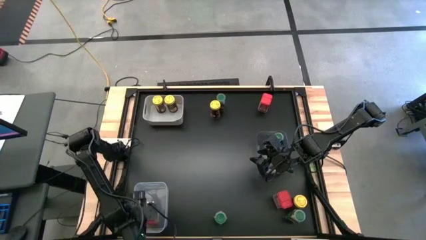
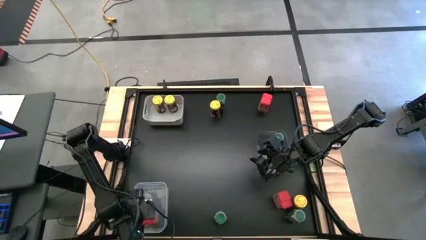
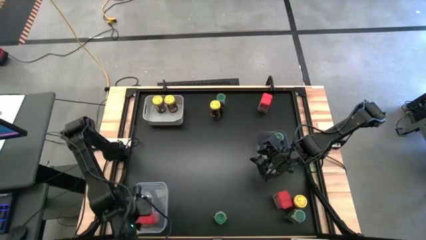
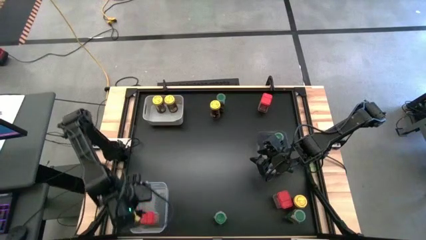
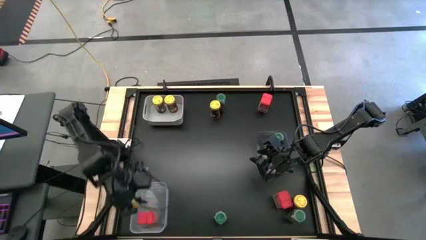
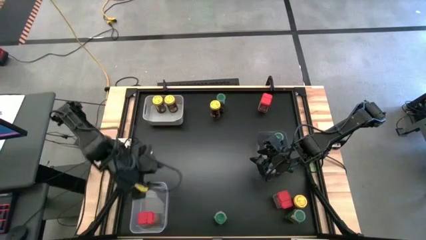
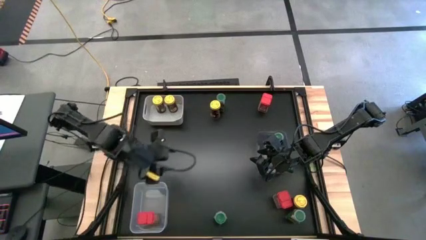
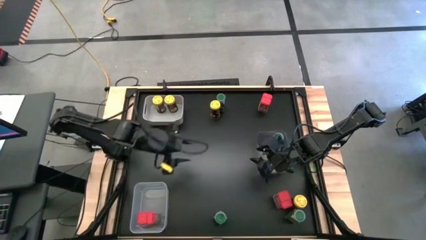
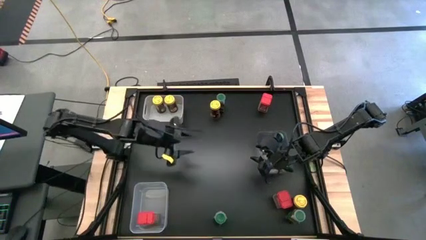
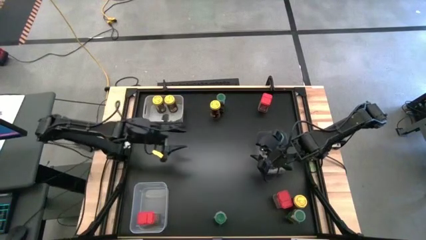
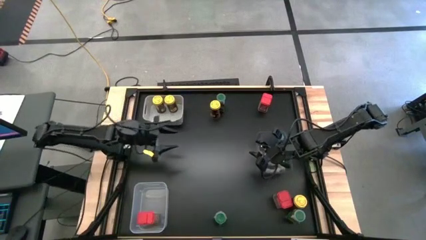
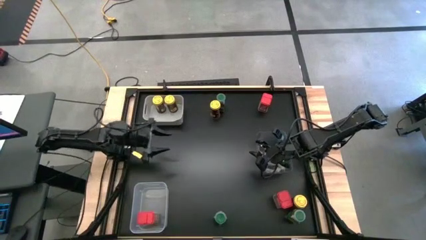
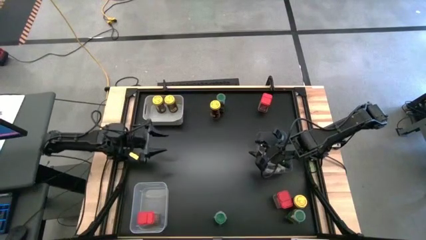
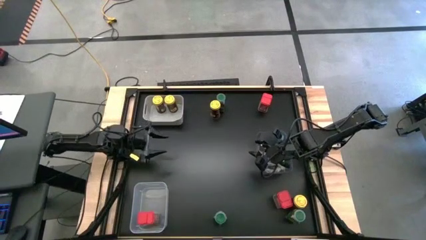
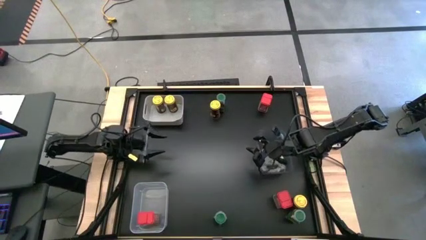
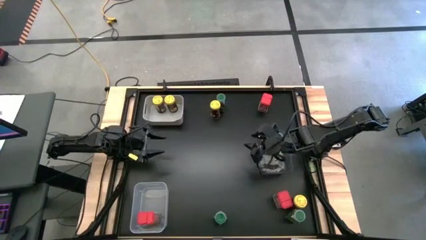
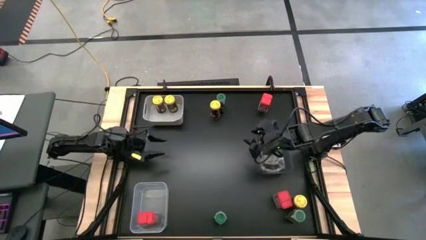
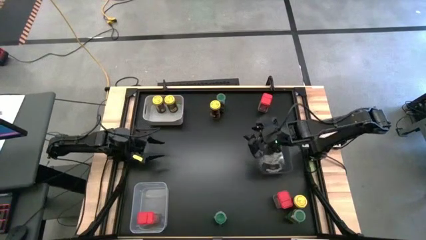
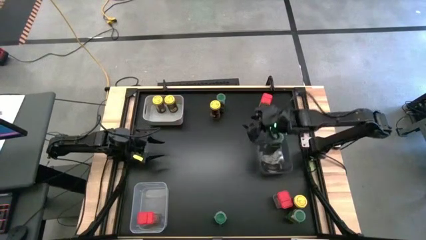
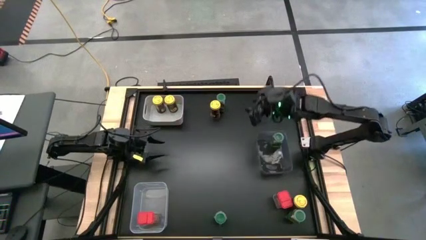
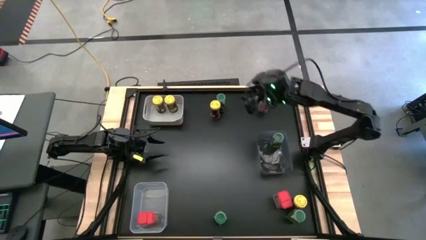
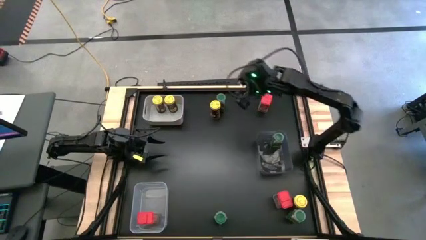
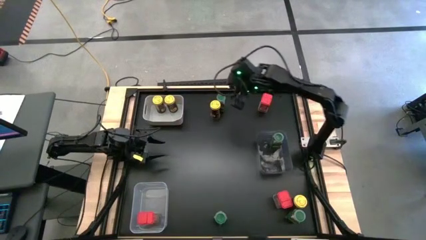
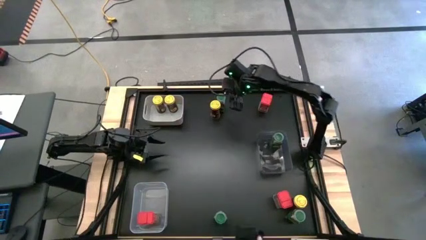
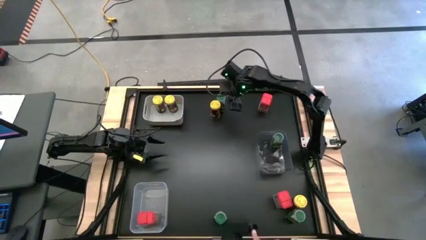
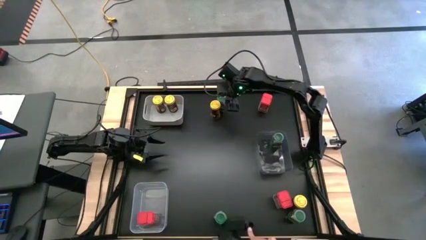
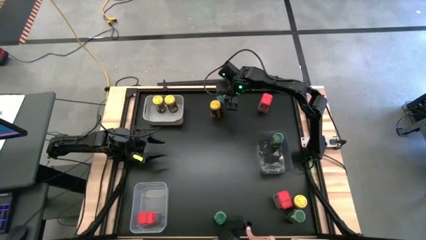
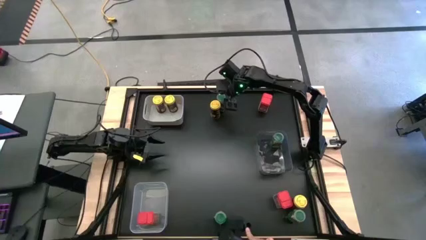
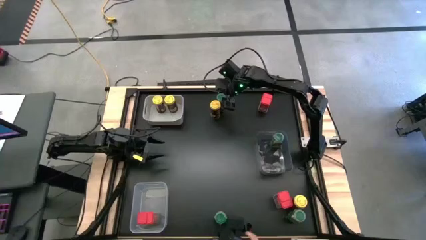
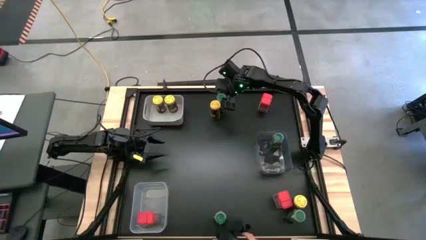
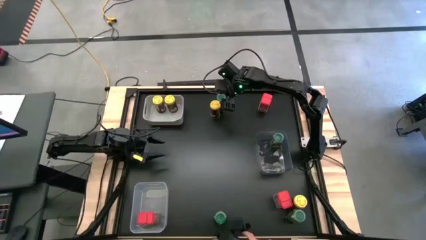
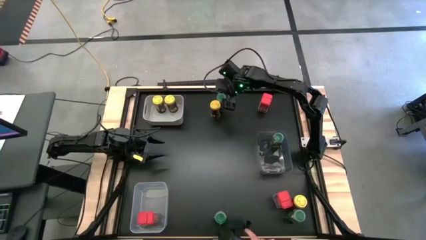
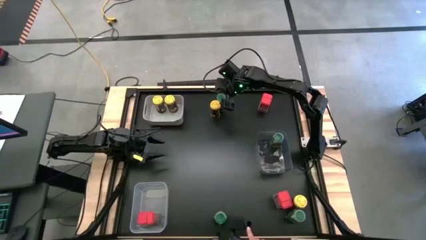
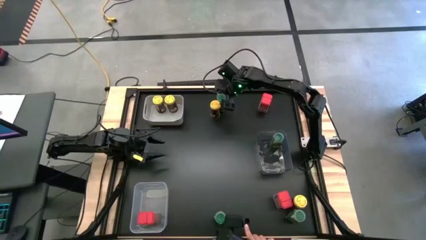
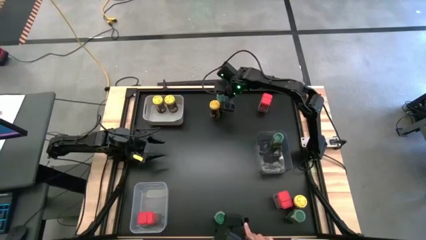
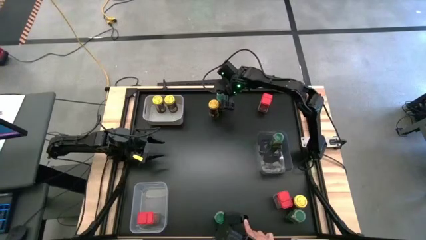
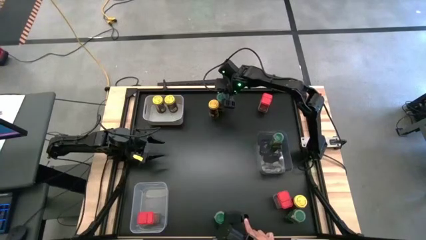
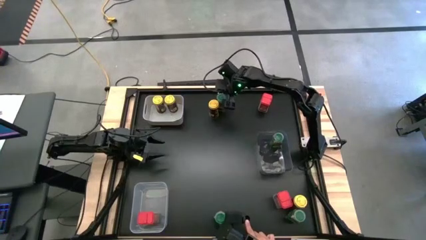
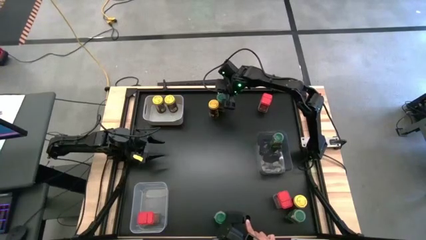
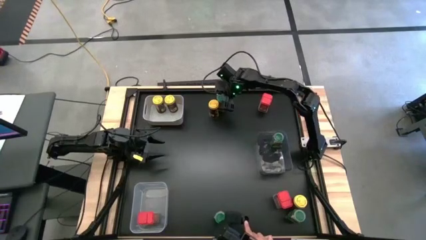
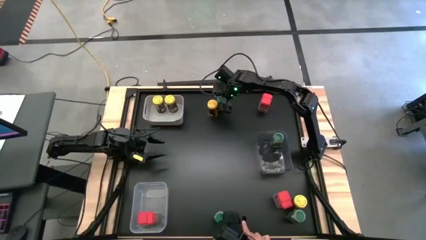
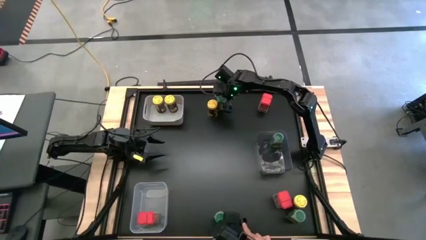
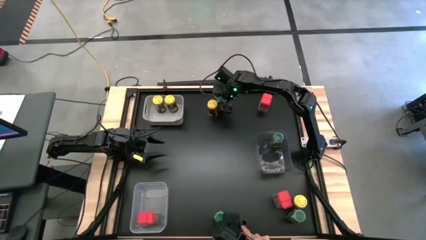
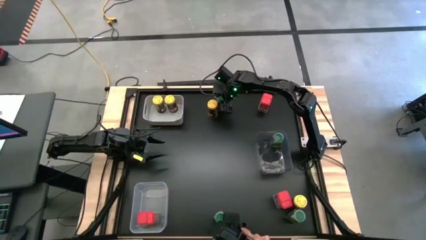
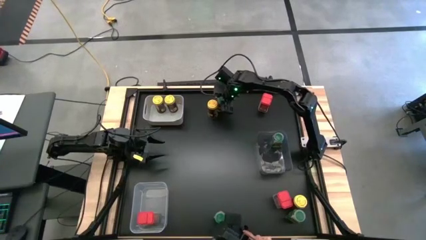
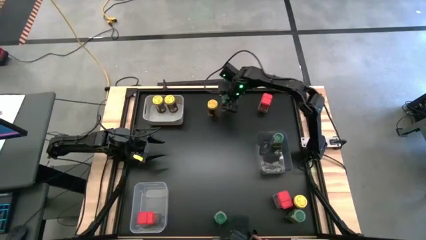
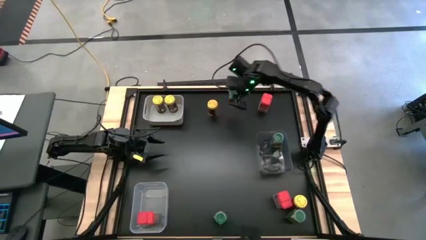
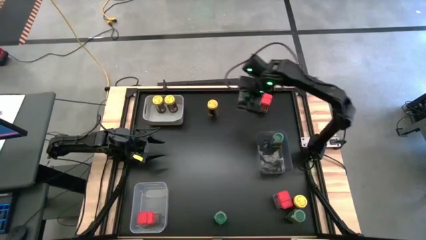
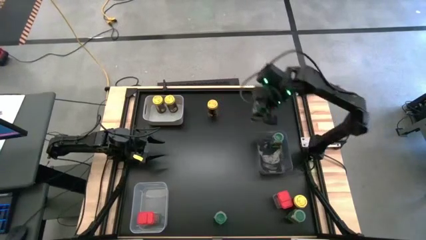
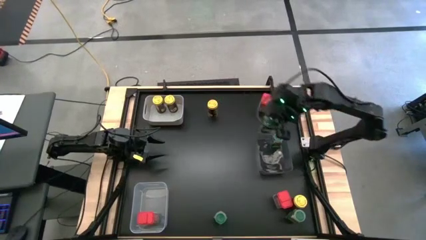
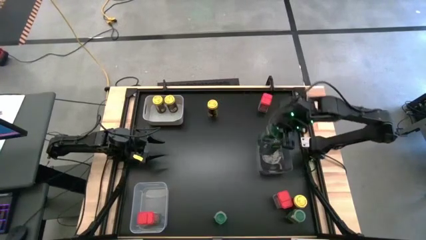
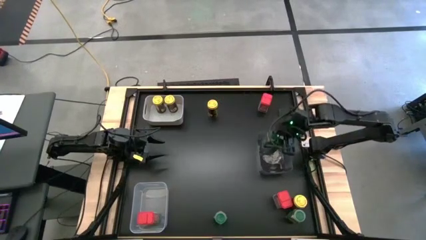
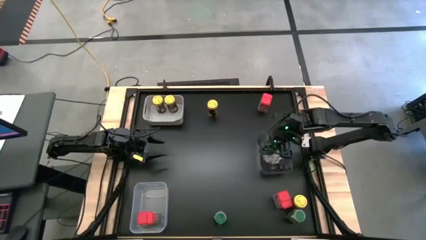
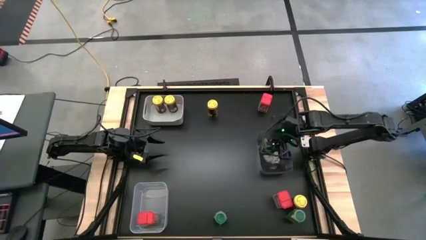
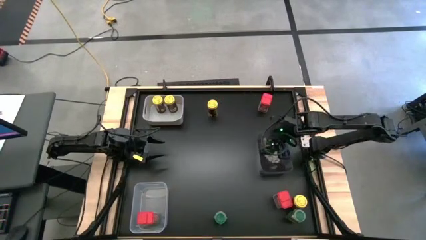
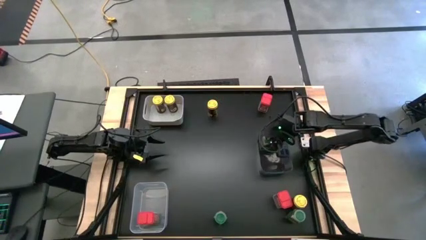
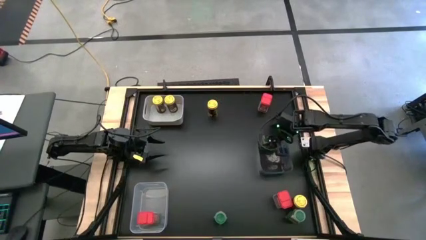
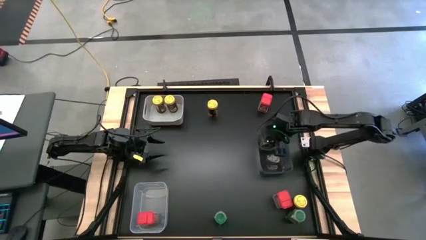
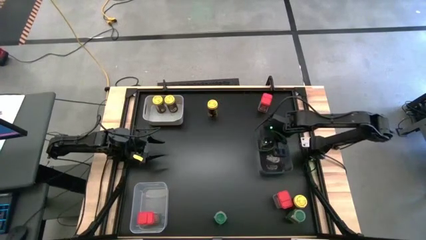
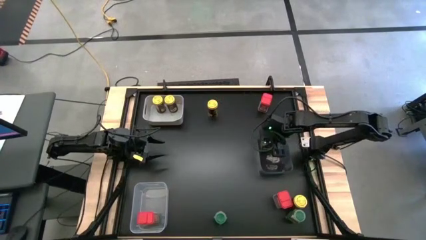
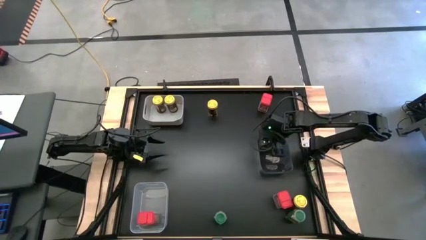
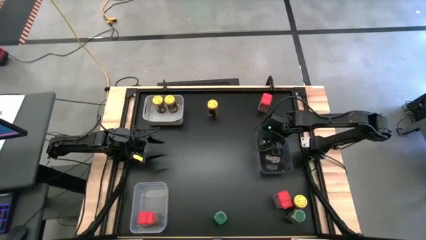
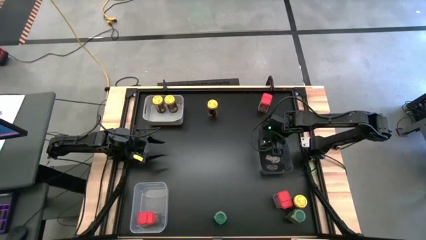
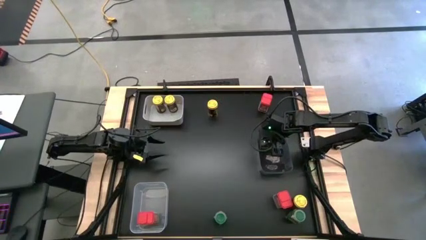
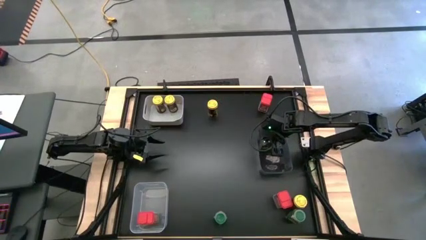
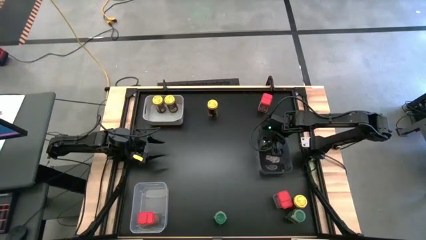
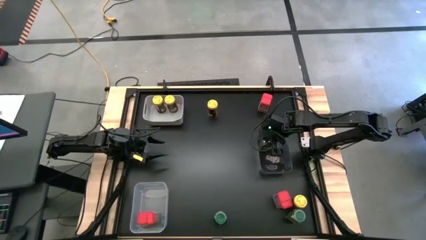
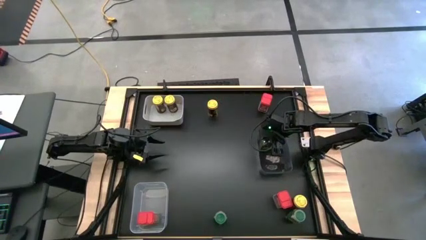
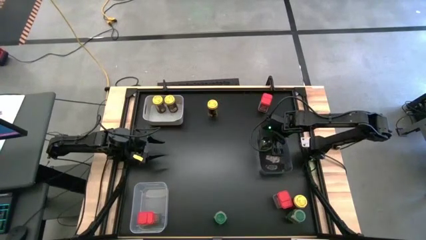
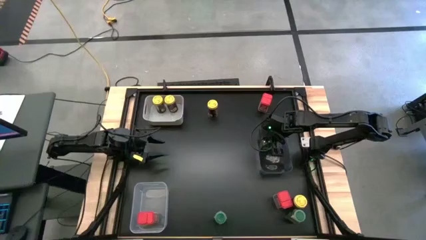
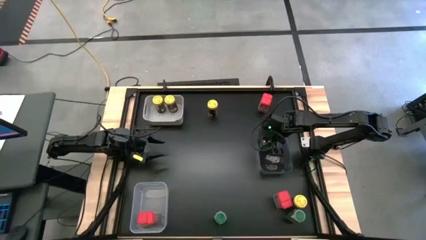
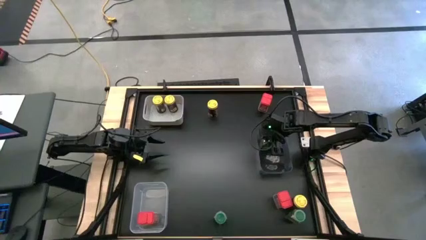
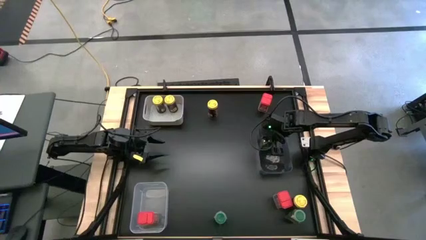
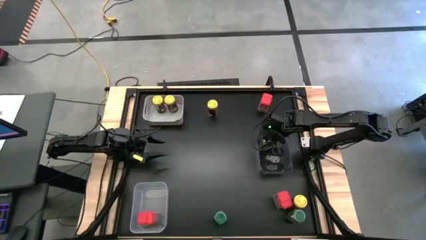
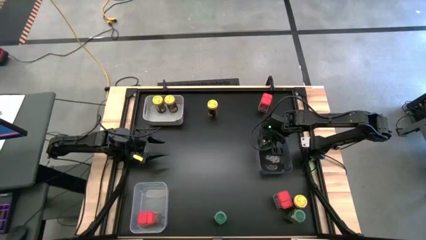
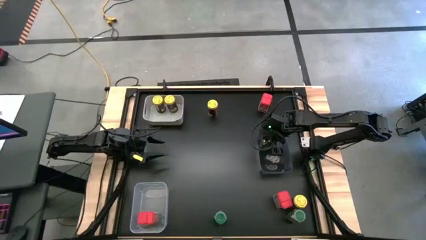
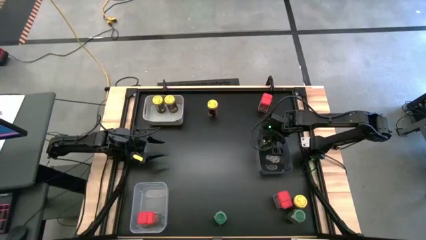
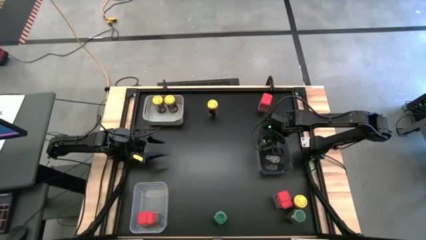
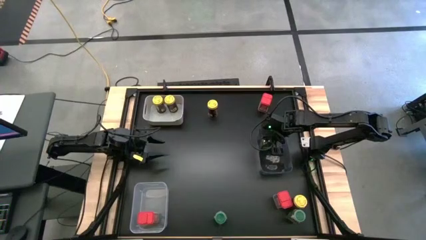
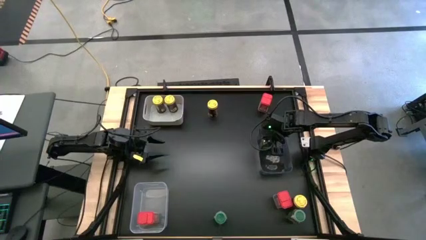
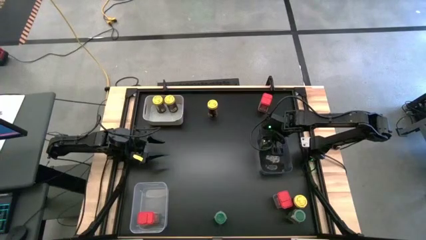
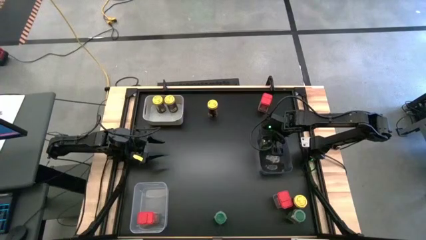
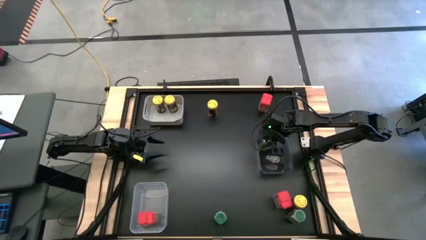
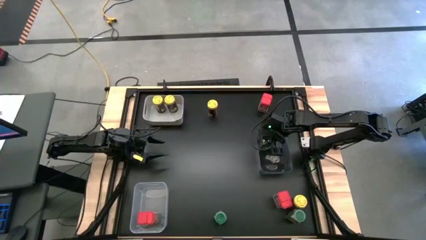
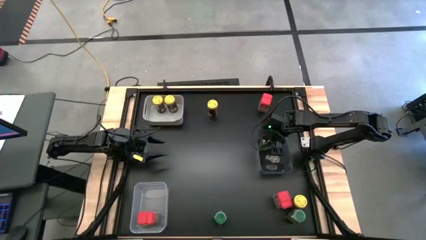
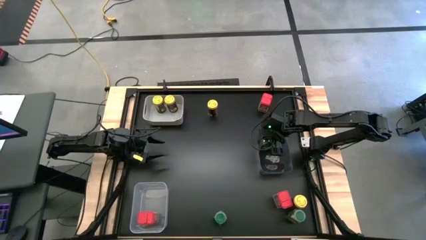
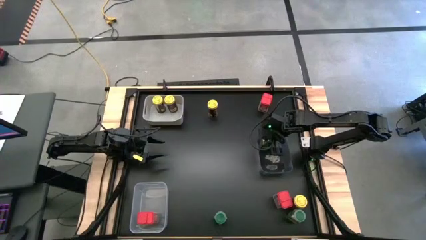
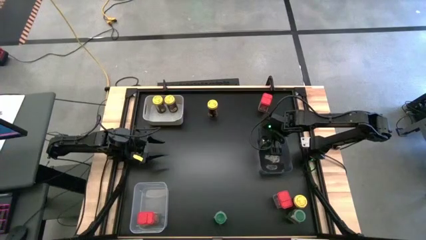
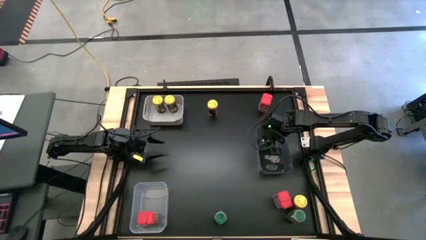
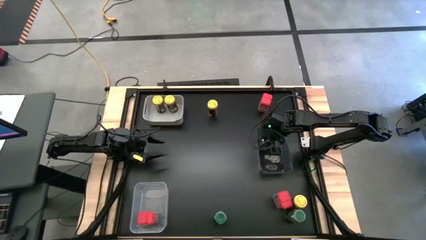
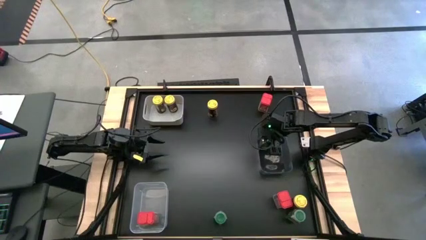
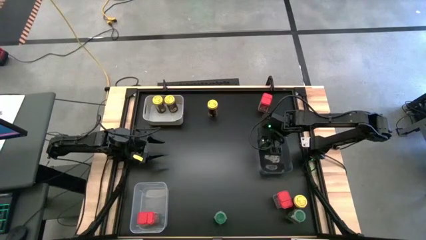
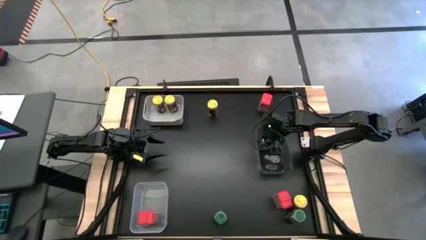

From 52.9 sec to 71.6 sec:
Task: Sort spices by type
Put the top green seasoning bottle into the black bin
